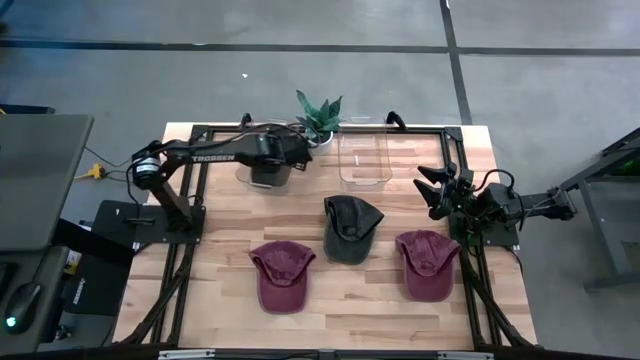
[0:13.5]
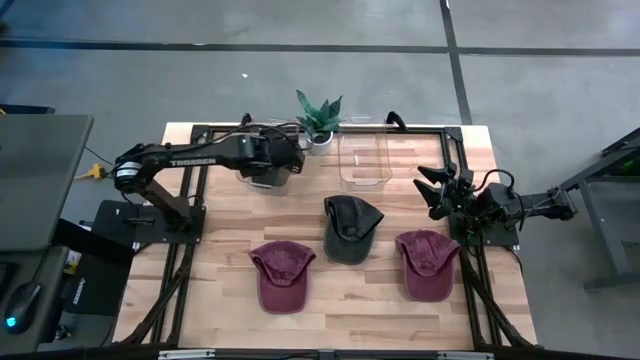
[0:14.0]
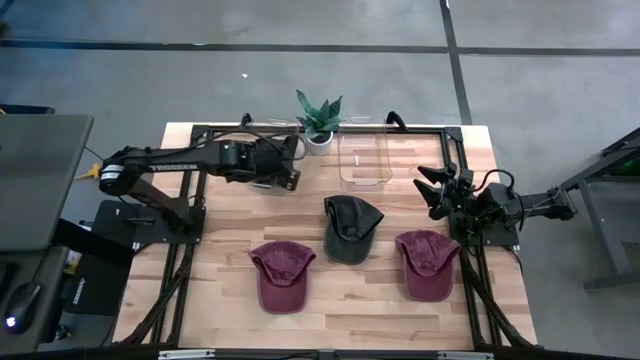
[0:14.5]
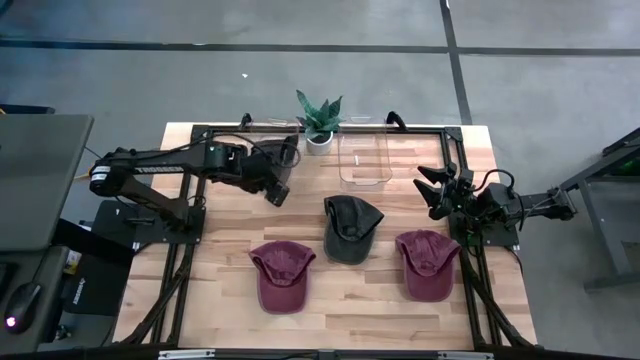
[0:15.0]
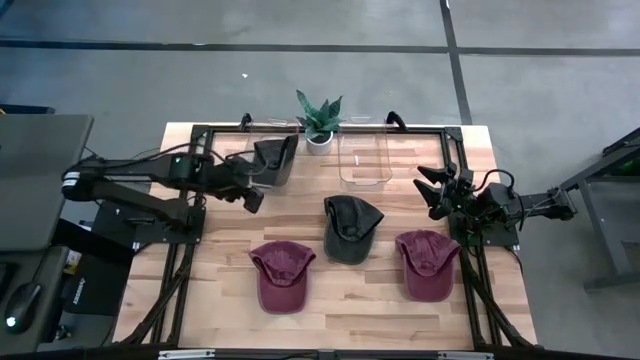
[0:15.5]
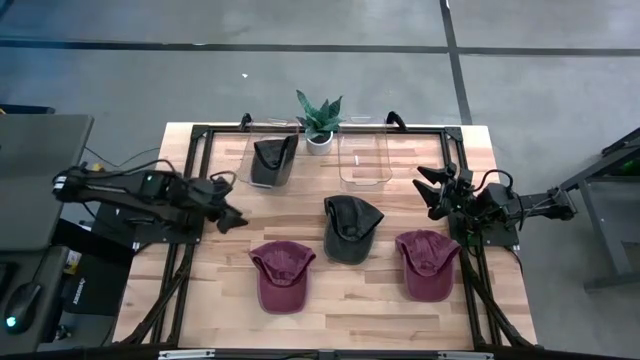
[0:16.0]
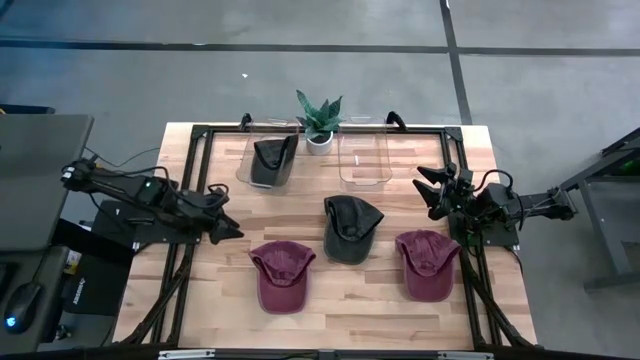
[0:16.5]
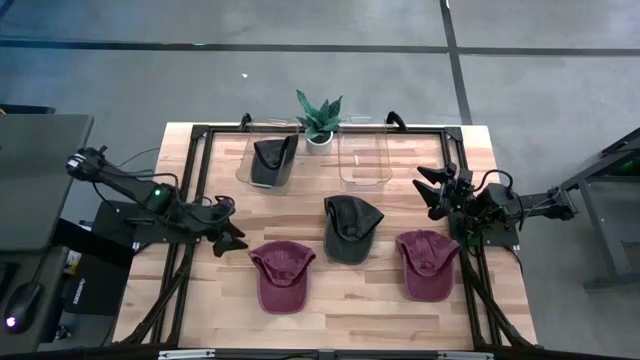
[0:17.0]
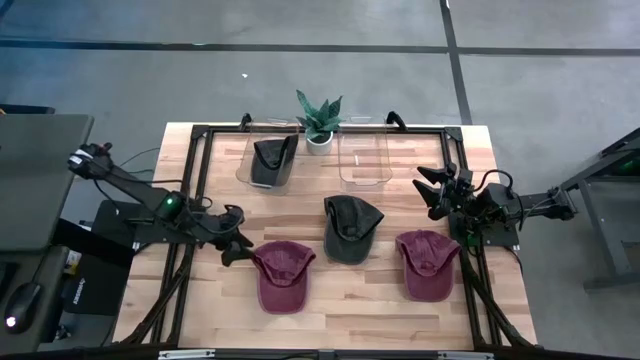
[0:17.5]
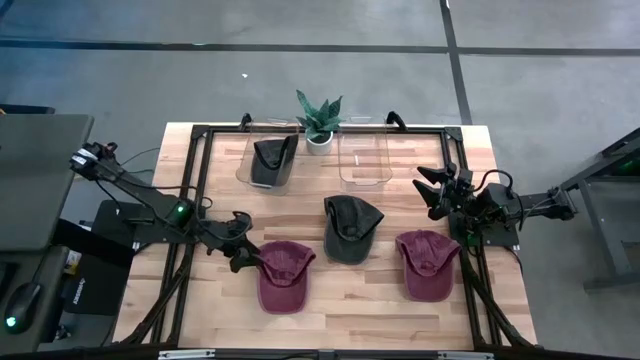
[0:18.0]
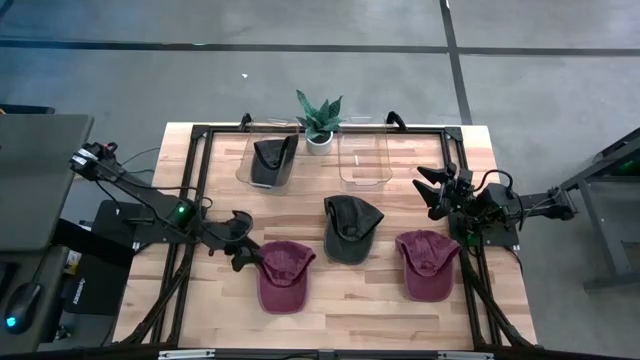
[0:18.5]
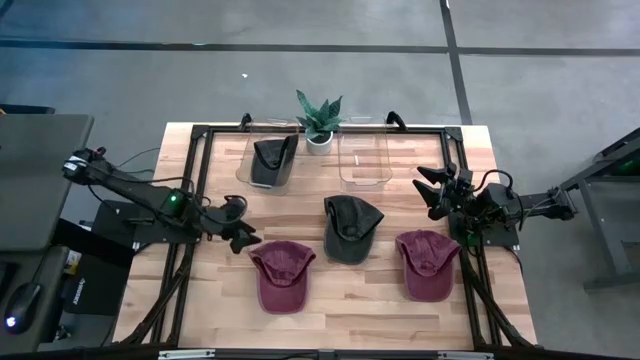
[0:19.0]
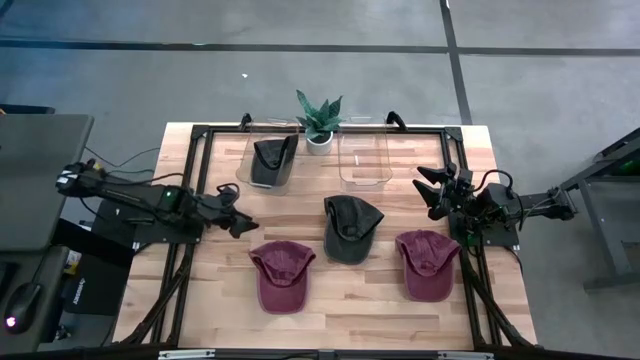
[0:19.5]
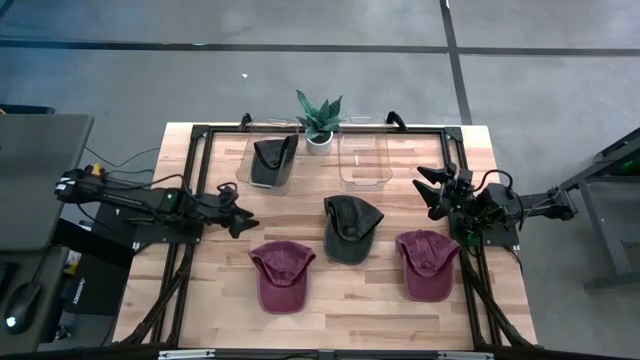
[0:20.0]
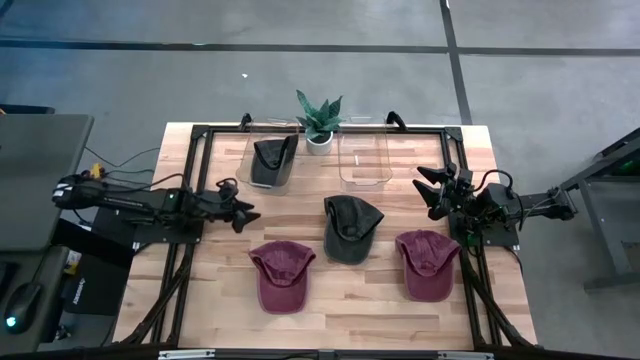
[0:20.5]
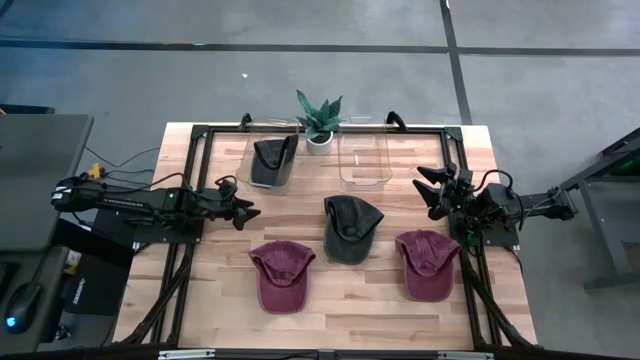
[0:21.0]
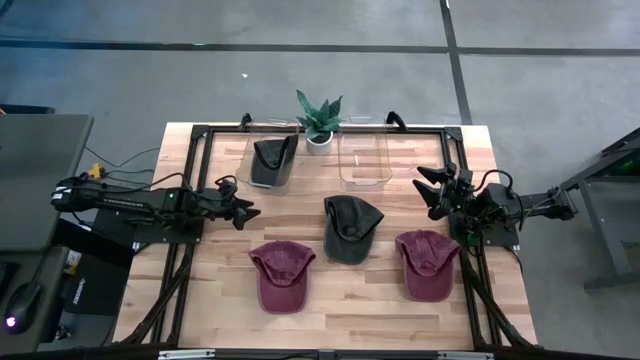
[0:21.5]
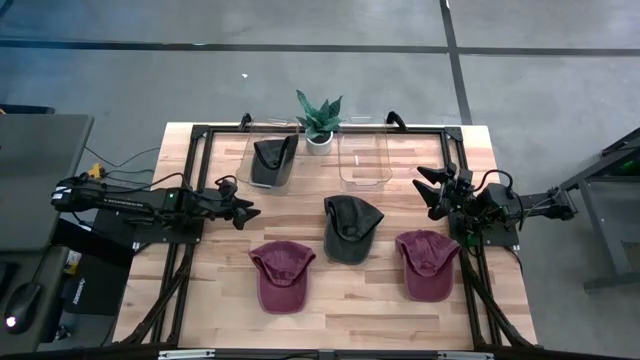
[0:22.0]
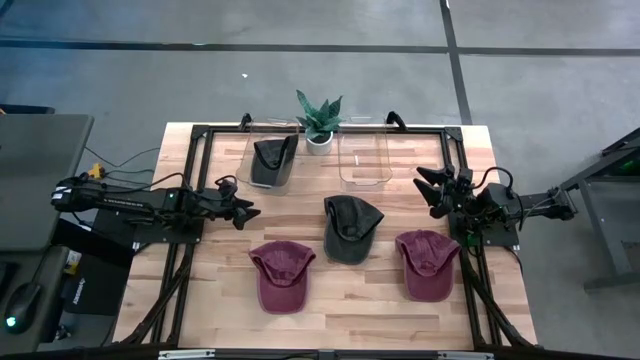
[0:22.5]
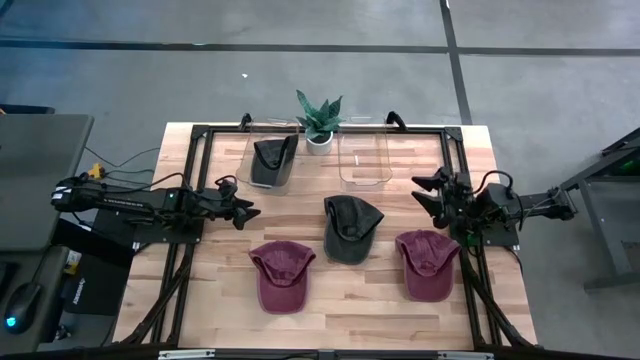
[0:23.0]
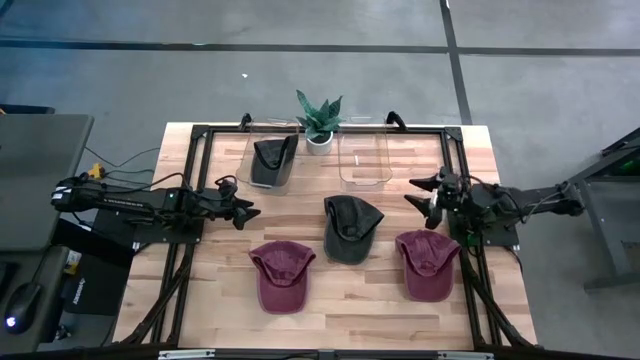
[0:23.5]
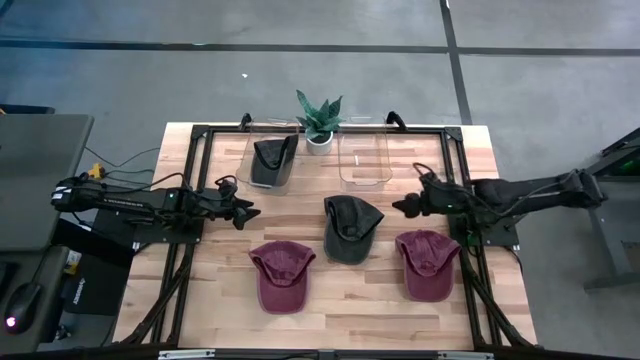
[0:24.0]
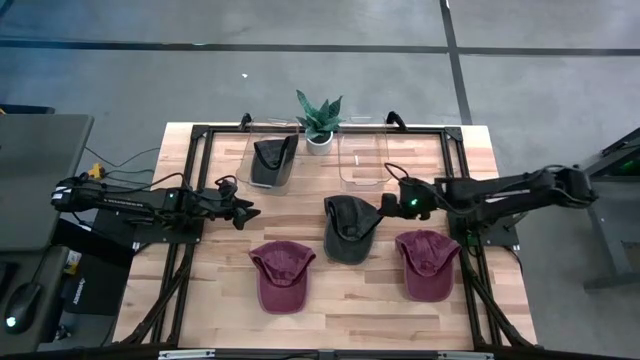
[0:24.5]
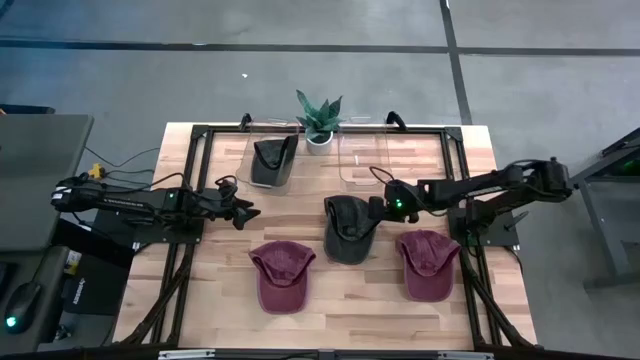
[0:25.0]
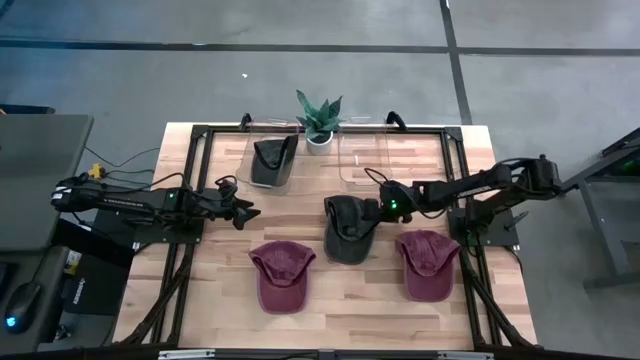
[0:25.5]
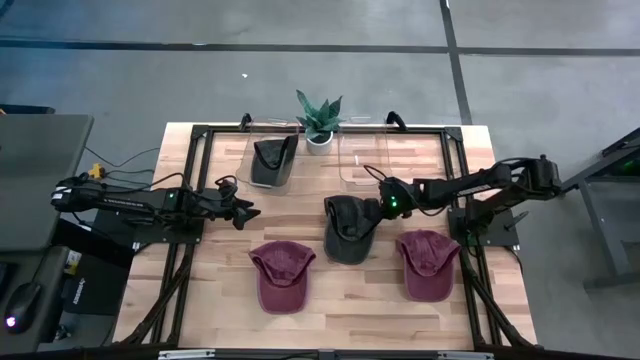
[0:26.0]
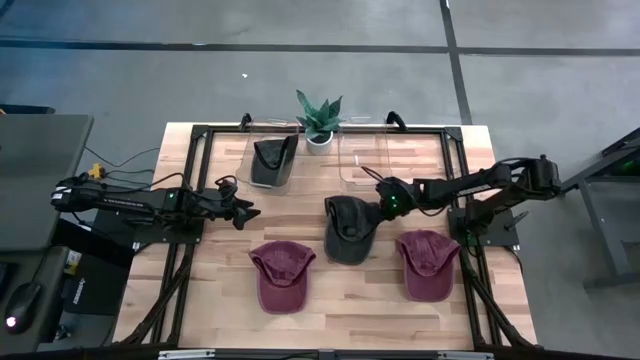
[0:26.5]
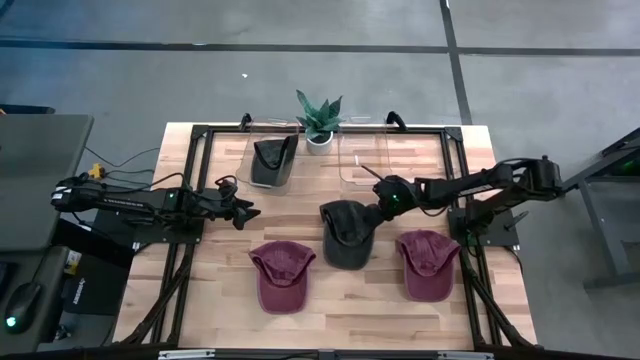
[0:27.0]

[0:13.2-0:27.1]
Task: Pick & Place hat
Put the black cap into the left transparent bin
